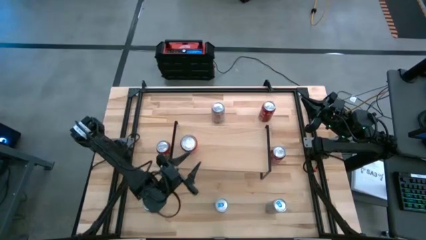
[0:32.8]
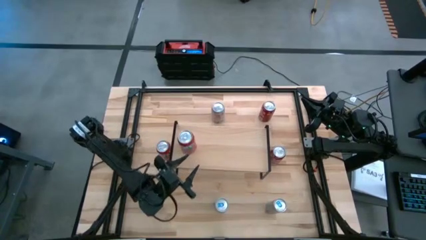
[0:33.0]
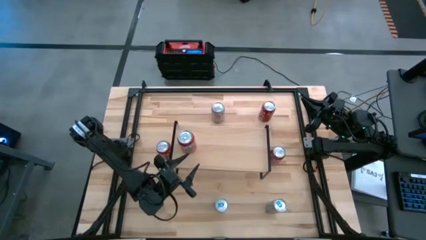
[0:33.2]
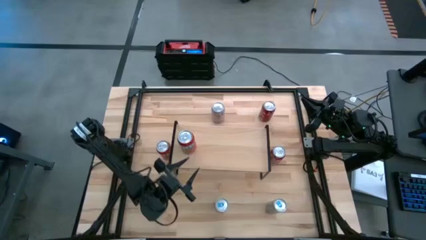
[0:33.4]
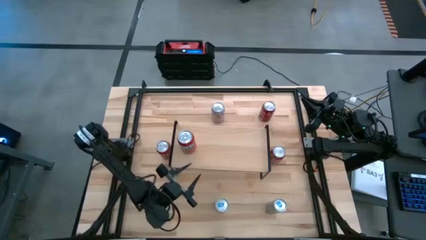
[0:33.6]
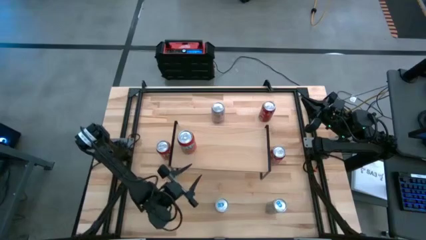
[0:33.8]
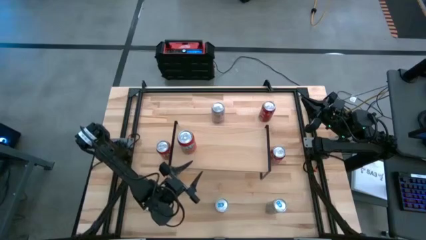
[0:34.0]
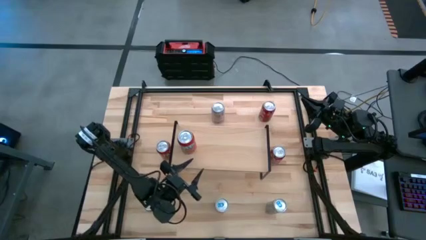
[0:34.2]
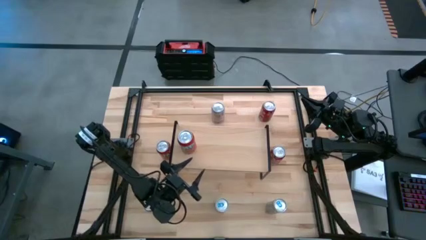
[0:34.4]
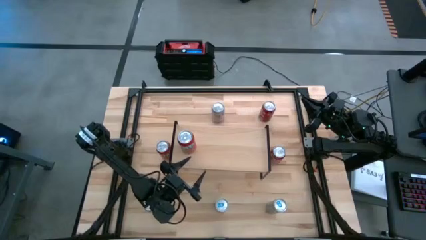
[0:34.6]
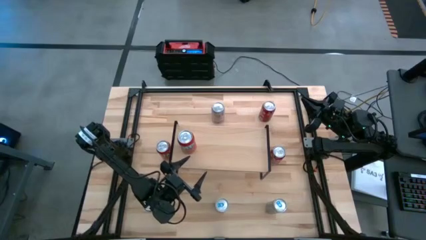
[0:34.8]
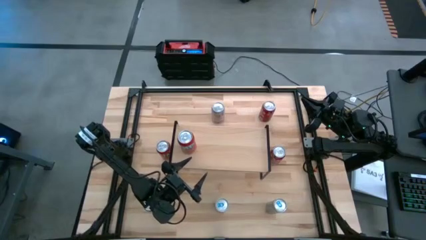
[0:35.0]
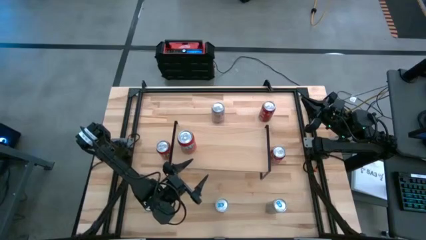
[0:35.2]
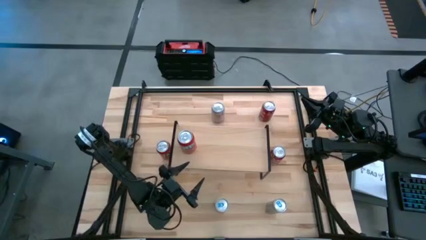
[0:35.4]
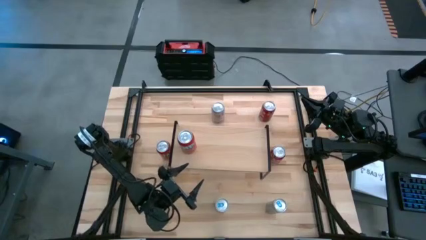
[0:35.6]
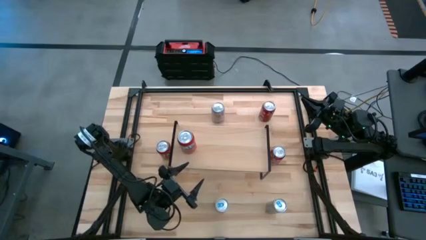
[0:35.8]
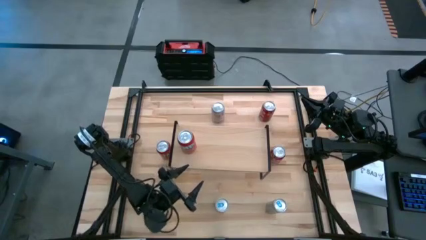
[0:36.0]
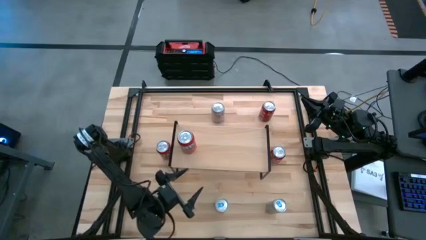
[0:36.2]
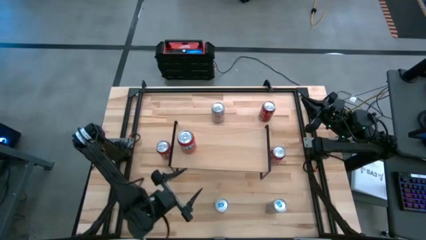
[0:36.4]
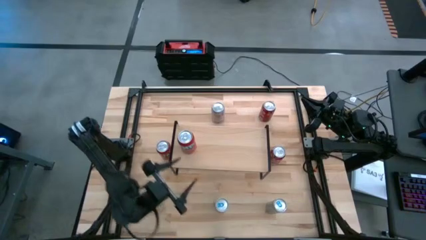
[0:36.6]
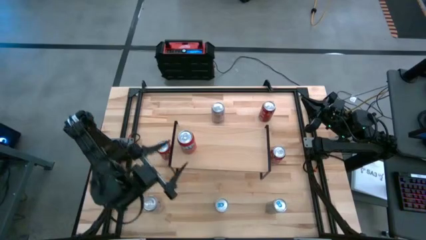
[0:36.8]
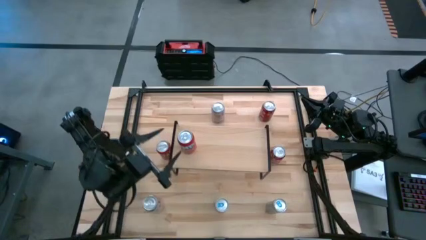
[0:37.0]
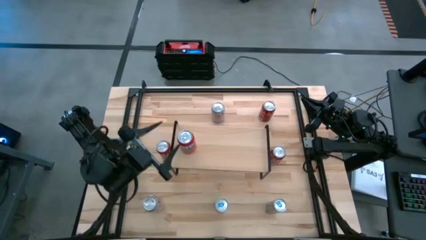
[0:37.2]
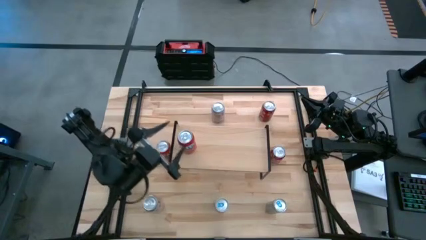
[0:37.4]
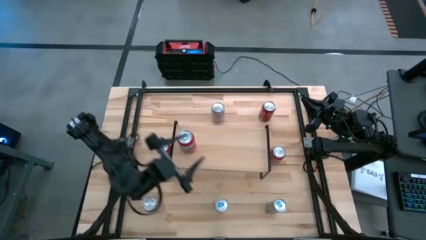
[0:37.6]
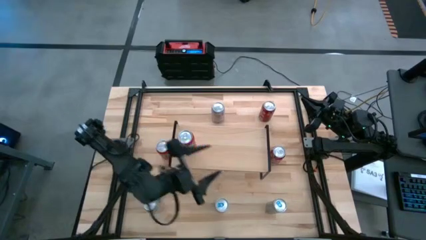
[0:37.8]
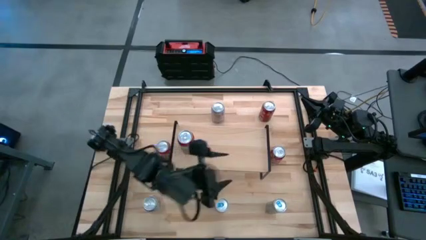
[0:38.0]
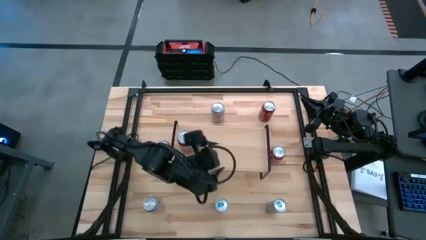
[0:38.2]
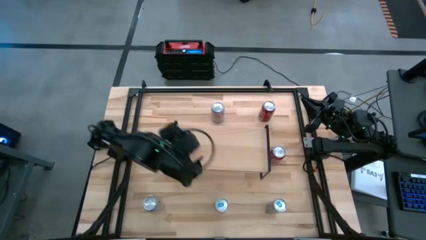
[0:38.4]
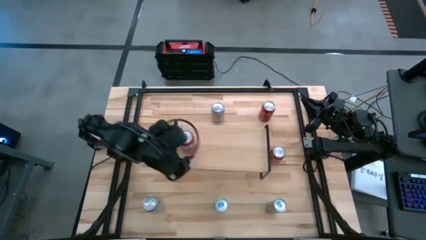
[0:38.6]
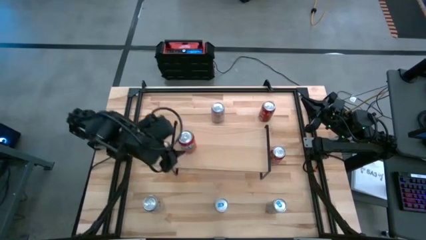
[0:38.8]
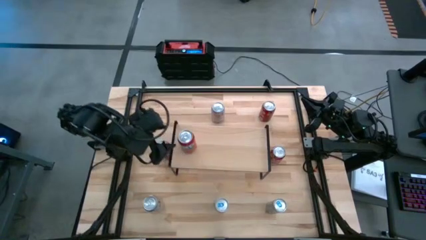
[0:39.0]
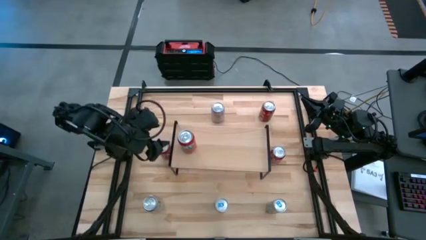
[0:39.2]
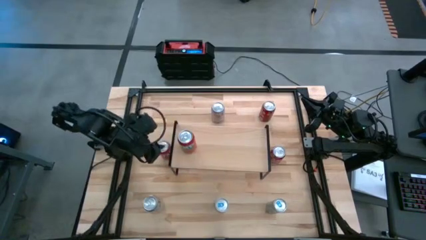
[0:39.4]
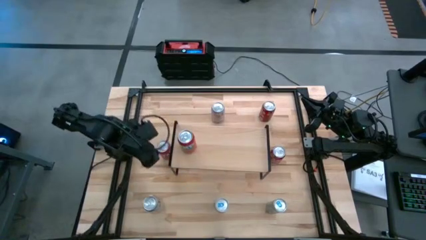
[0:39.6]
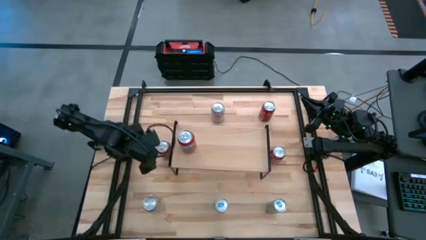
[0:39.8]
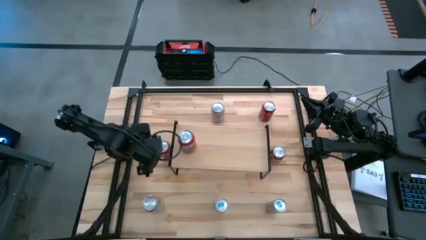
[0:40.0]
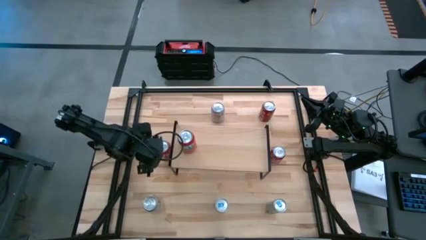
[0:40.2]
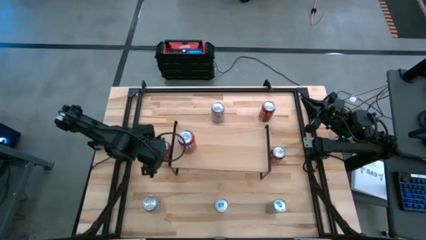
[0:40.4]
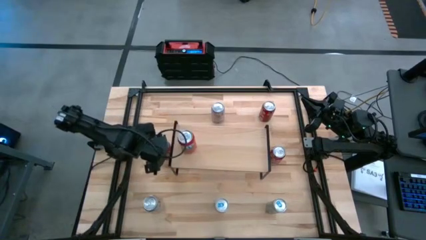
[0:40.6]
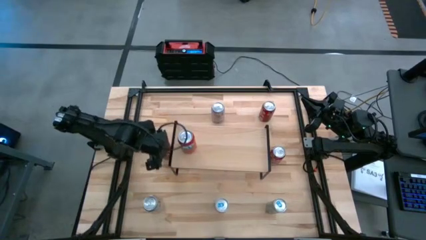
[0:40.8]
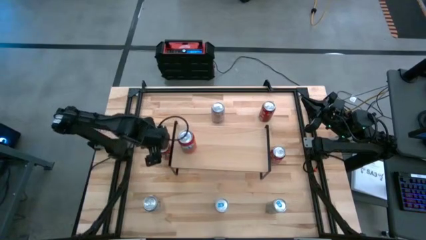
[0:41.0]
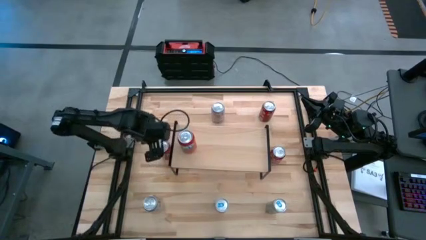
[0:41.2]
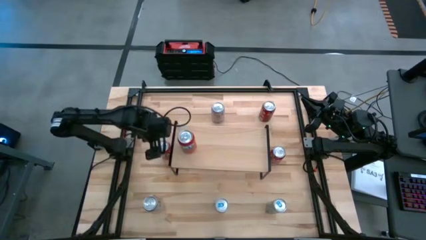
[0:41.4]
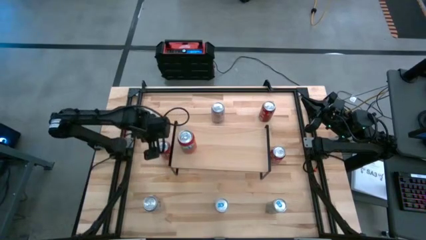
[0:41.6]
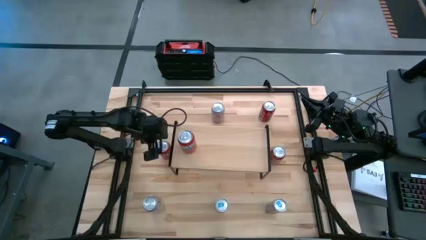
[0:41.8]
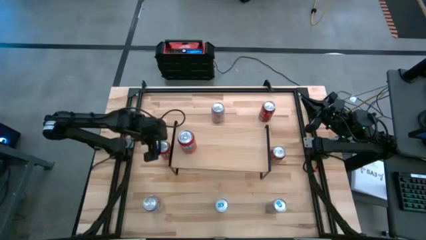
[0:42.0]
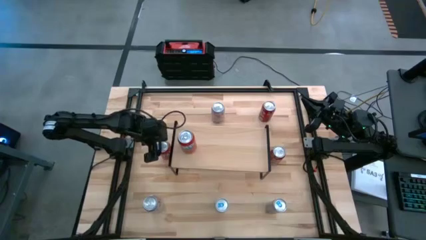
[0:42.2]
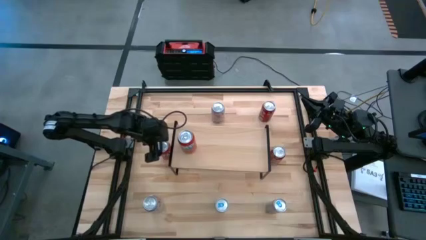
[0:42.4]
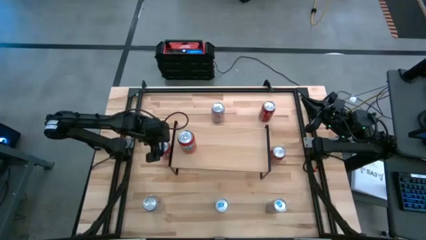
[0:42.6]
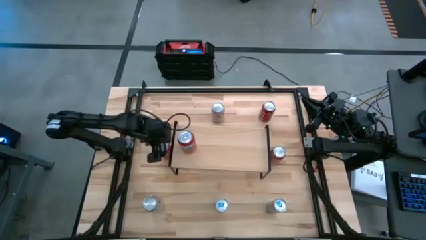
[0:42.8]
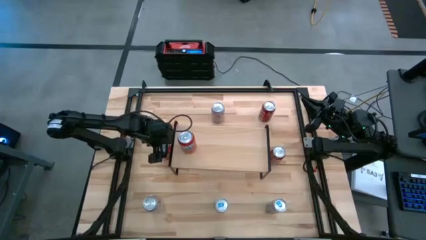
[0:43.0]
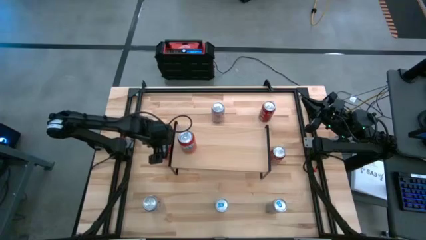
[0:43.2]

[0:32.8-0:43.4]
Task: Place canned beverage on shelf
Put the orange soda can on the shelf

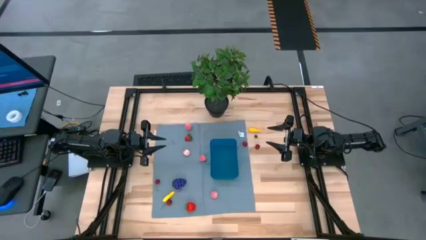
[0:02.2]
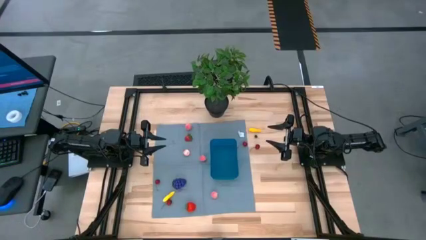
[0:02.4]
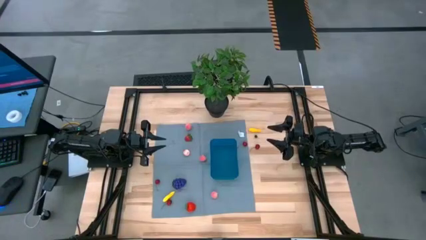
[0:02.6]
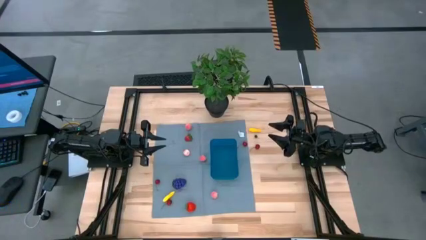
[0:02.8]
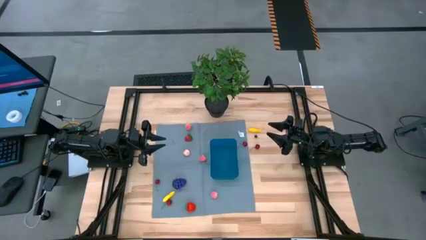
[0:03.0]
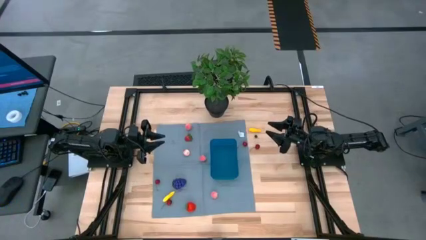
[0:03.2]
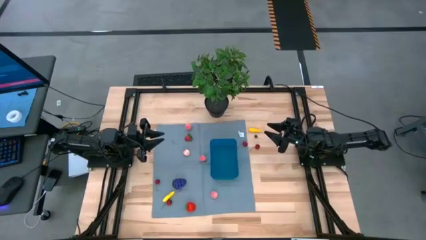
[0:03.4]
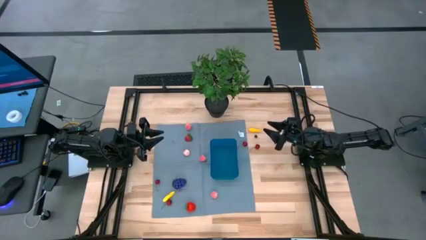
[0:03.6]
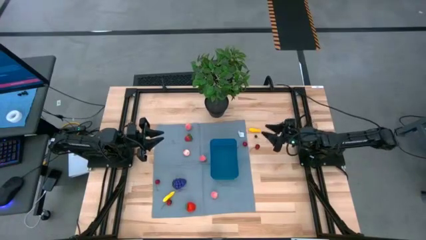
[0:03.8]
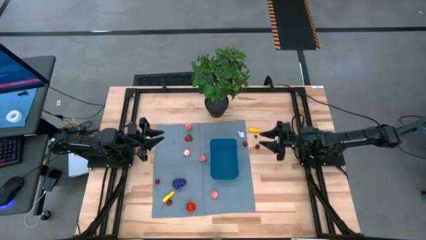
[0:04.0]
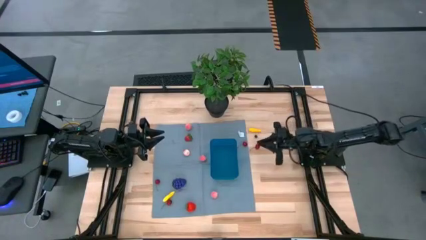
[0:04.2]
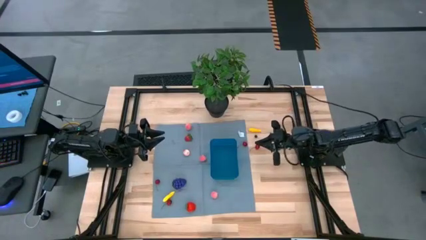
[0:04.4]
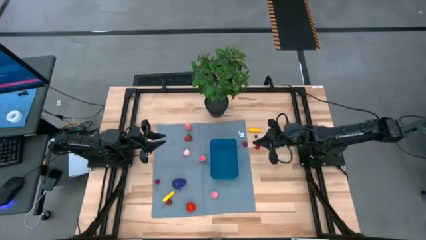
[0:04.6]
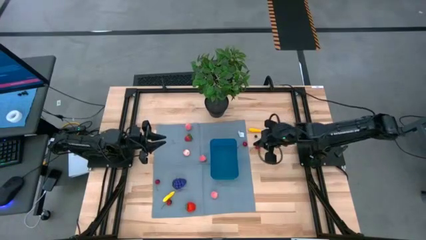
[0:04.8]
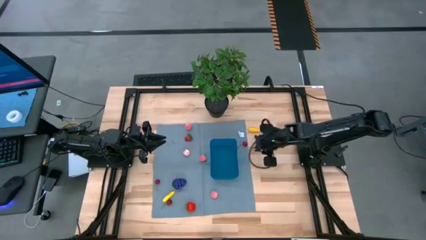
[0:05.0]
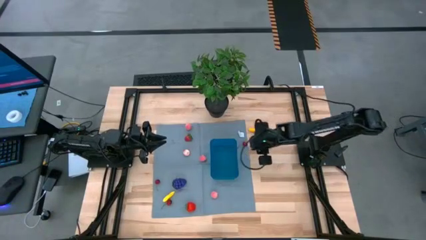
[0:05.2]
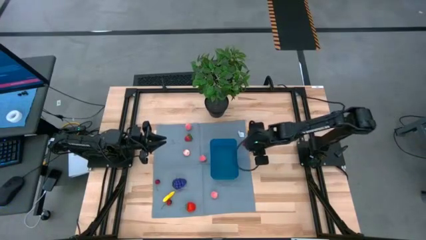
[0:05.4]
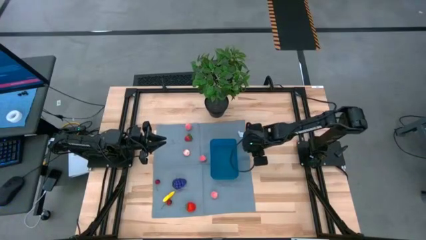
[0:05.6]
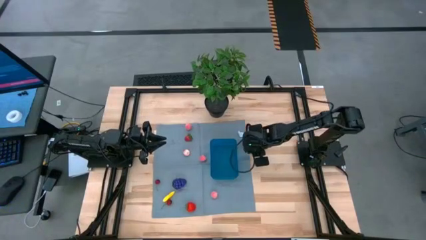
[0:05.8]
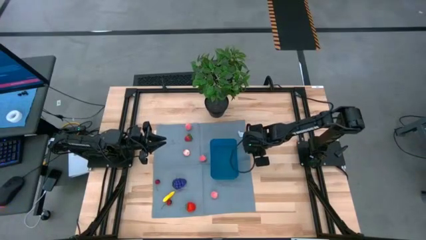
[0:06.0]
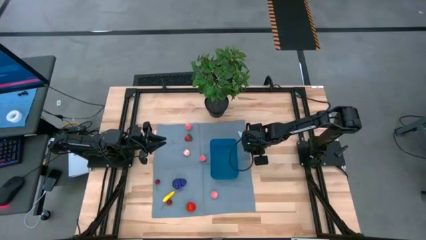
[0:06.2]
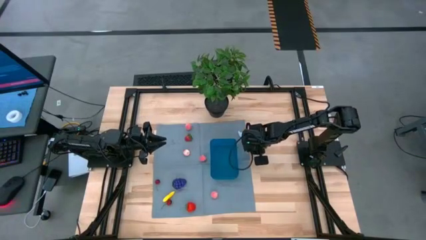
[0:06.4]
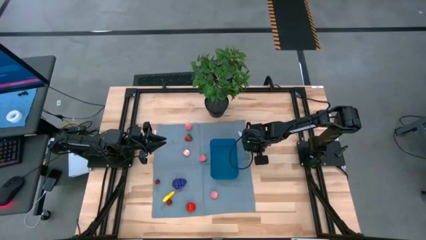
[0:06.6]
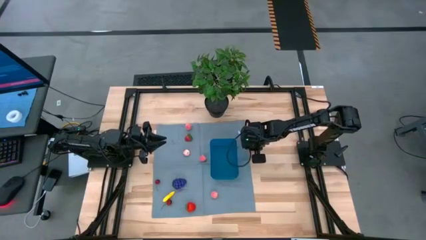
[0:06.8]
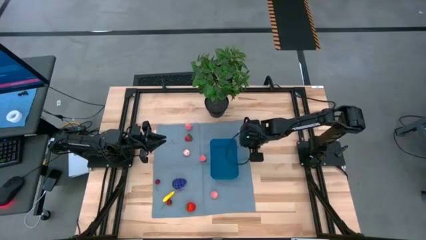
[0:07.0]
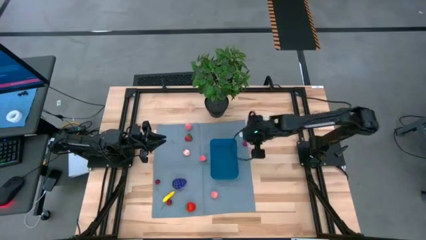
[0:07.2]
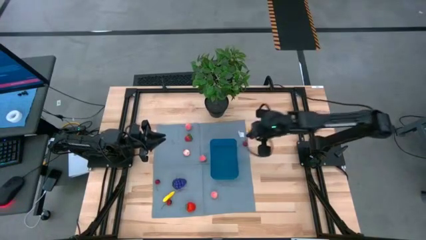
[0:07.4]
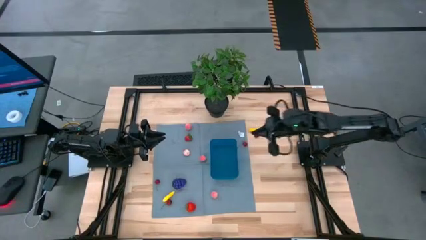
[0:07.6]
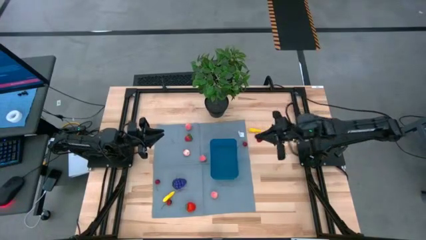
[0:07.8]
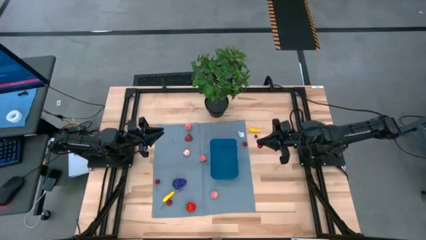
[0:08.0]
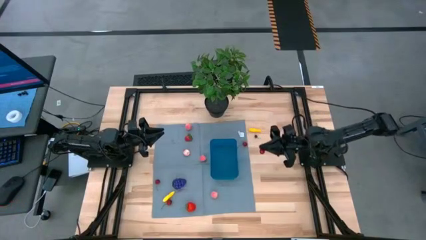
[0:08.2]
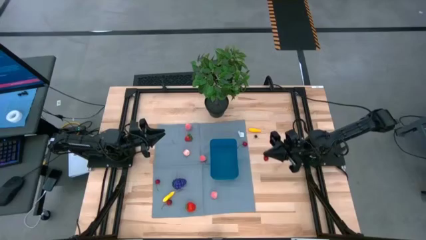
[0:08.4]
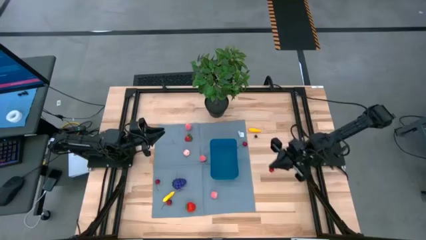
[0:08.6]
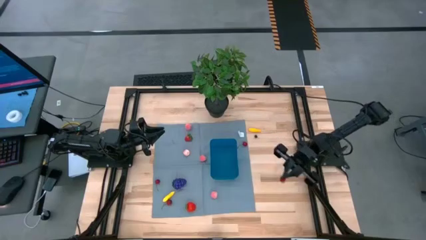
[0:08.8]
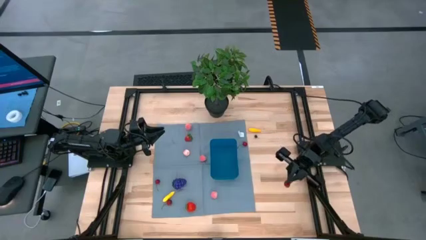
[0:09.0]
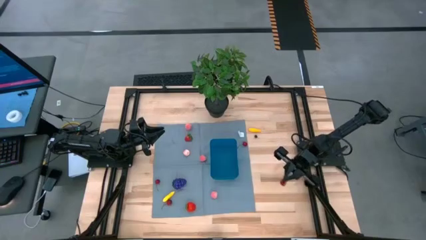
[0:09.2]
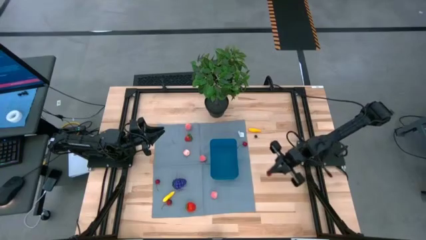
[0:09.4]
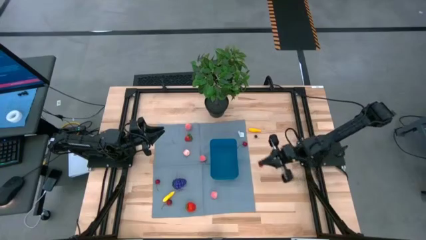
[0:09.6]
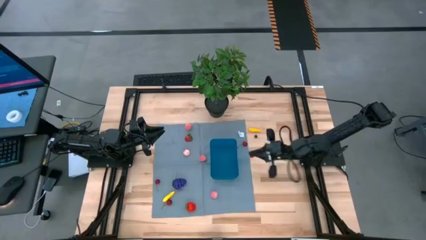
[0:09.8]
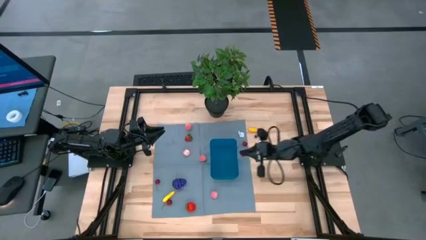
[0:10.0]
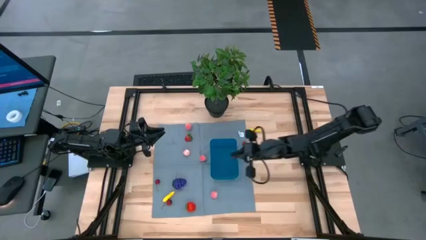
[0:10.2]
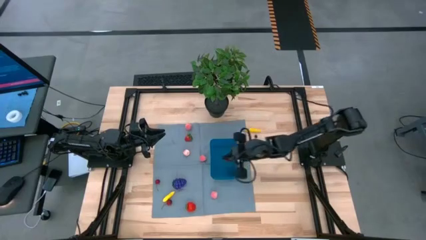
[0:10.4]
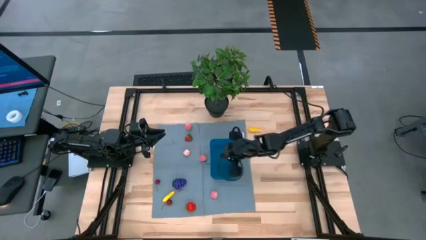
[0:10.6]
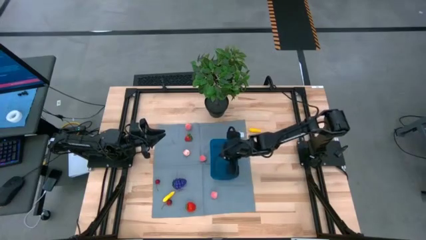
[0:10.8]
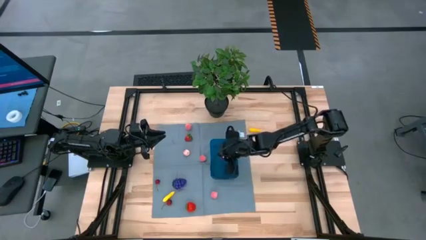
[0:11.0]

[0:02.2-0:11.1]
Task: Pick and placing Produce into tupperware
Put the red cherry into the bin
